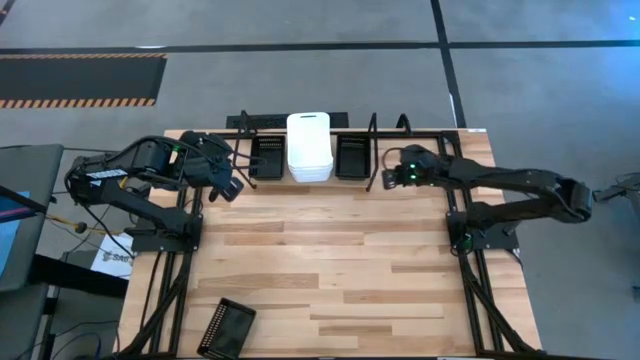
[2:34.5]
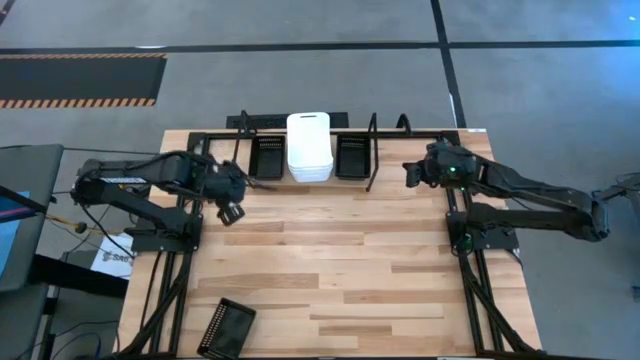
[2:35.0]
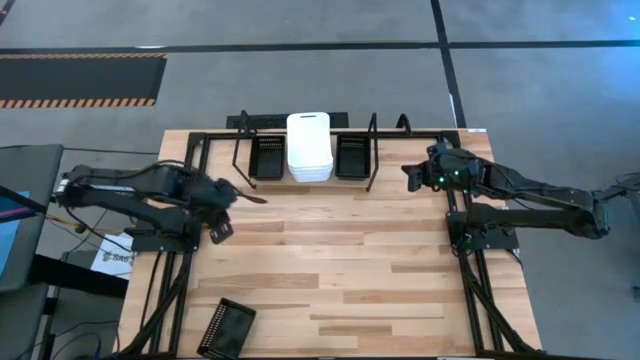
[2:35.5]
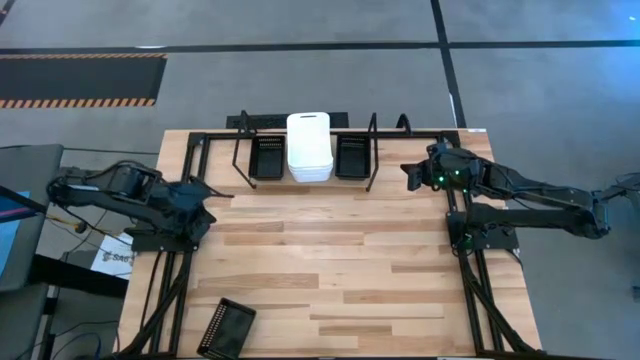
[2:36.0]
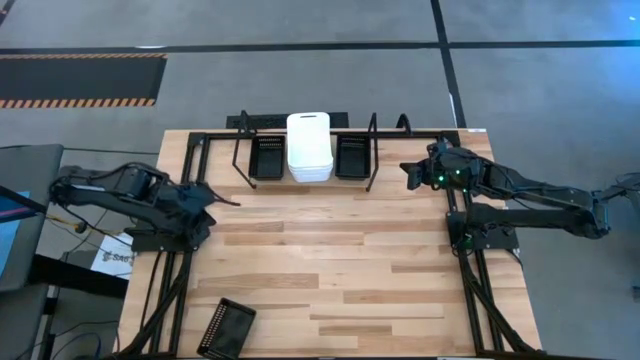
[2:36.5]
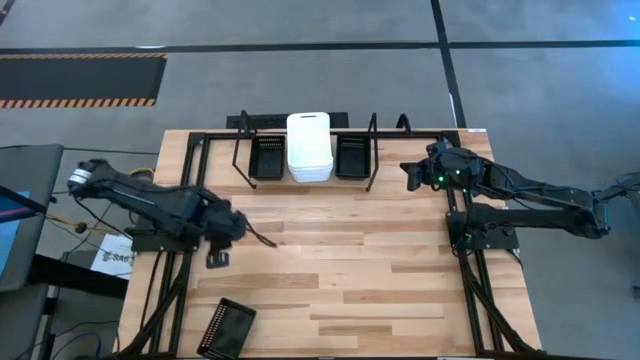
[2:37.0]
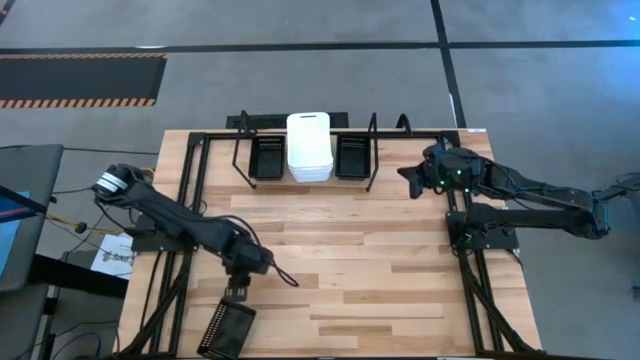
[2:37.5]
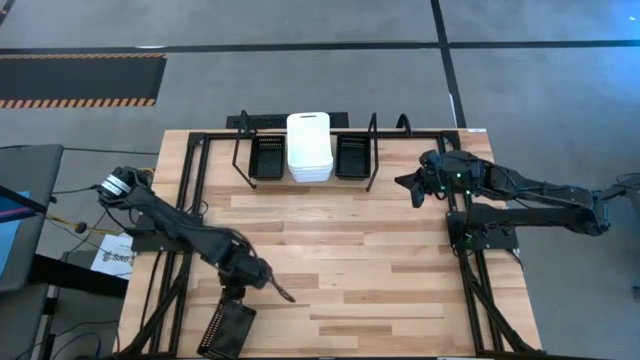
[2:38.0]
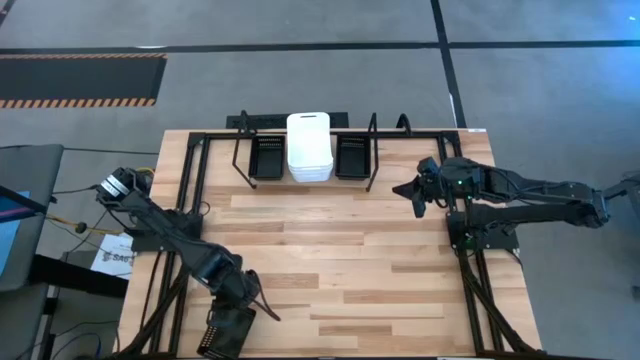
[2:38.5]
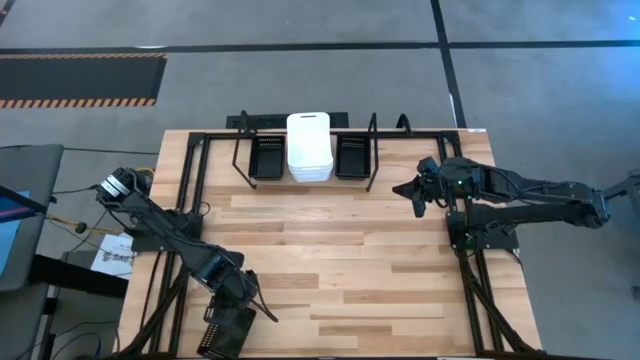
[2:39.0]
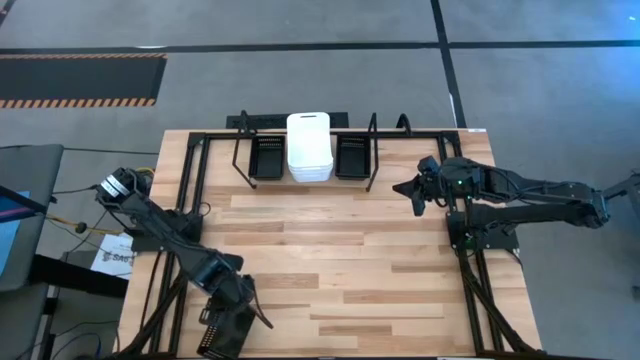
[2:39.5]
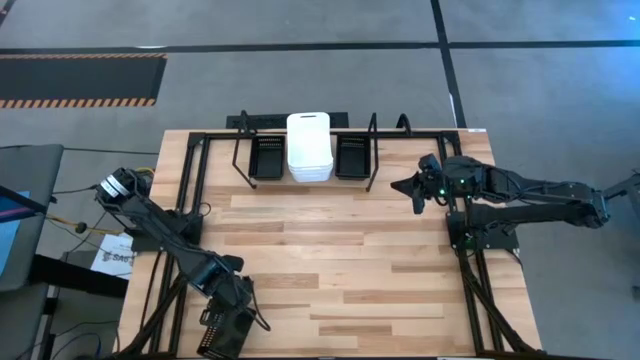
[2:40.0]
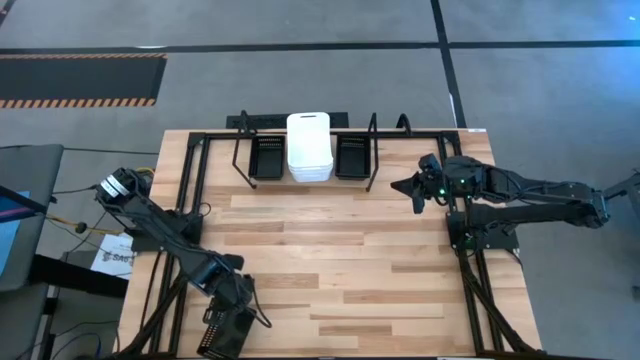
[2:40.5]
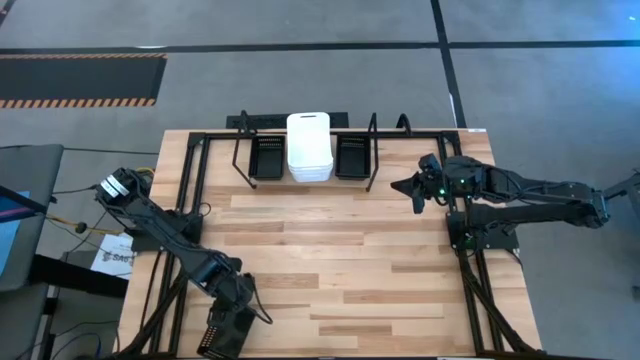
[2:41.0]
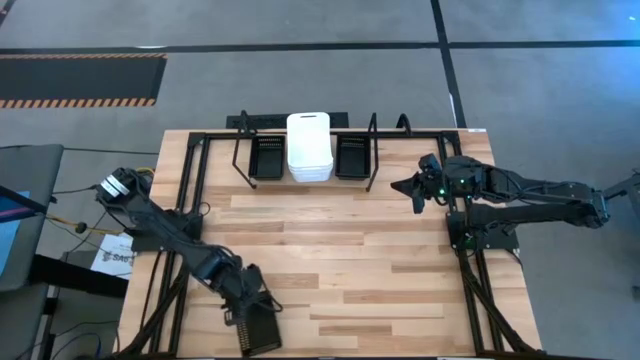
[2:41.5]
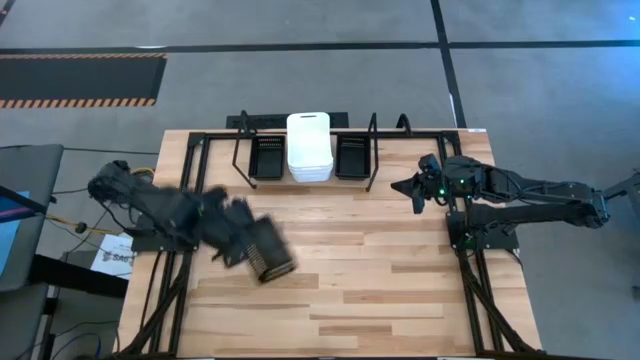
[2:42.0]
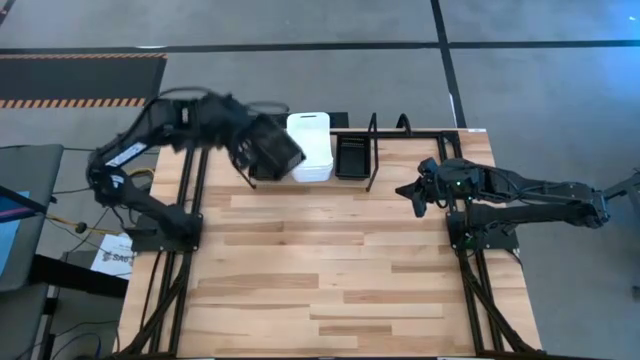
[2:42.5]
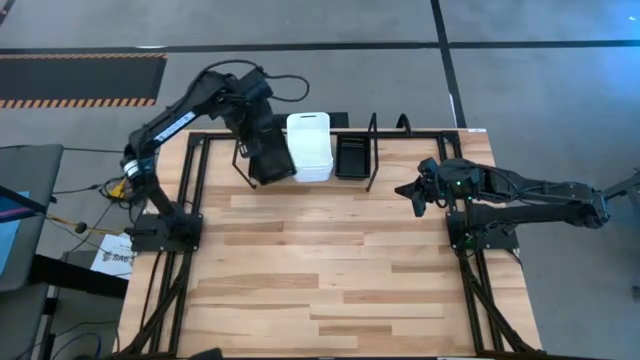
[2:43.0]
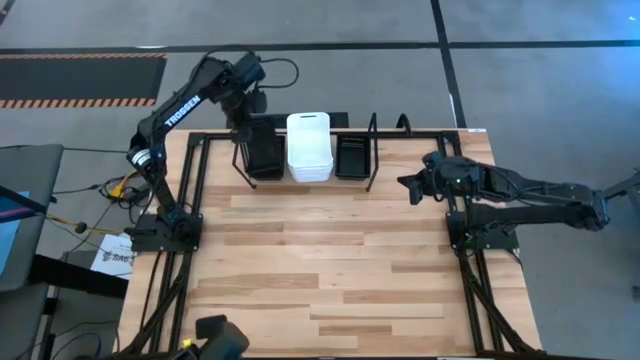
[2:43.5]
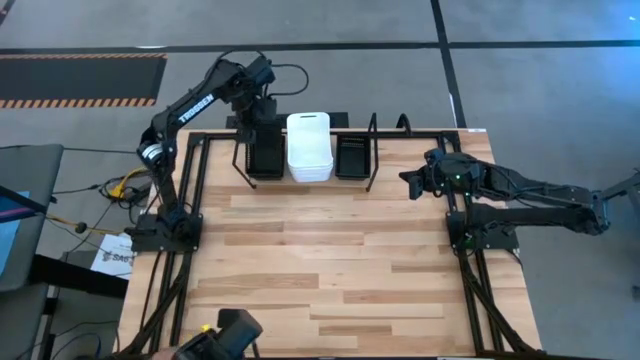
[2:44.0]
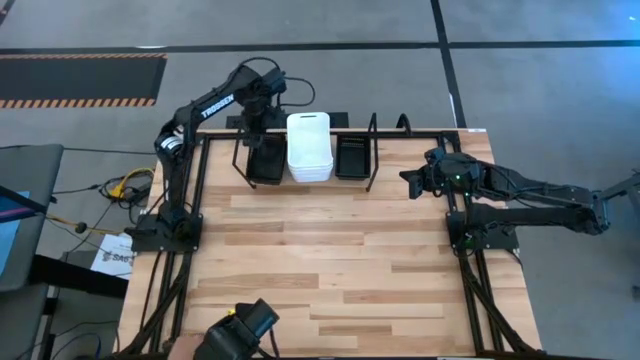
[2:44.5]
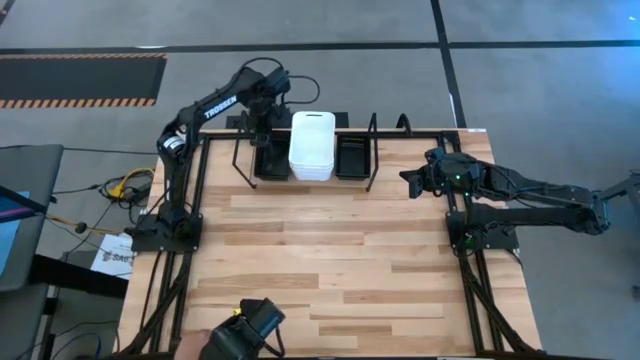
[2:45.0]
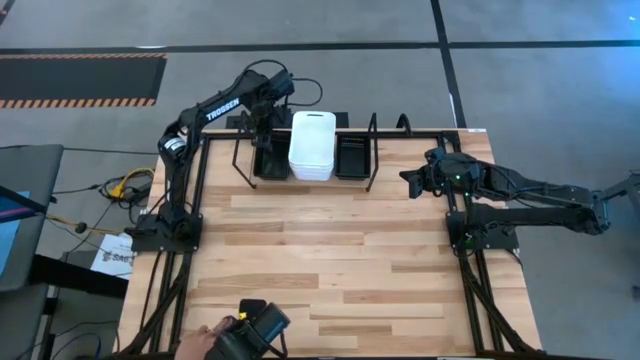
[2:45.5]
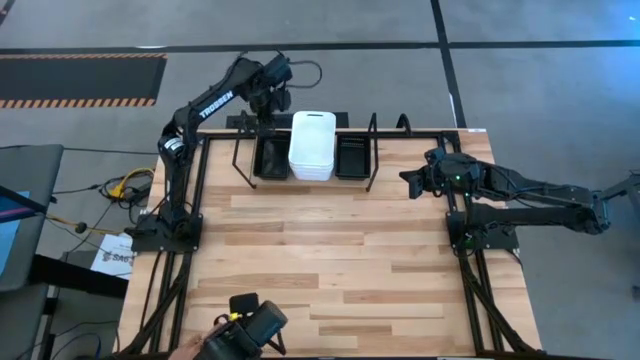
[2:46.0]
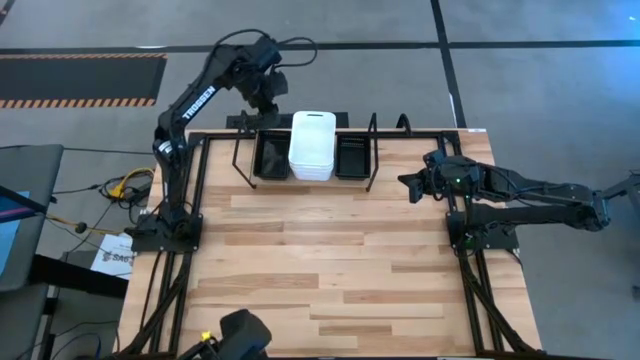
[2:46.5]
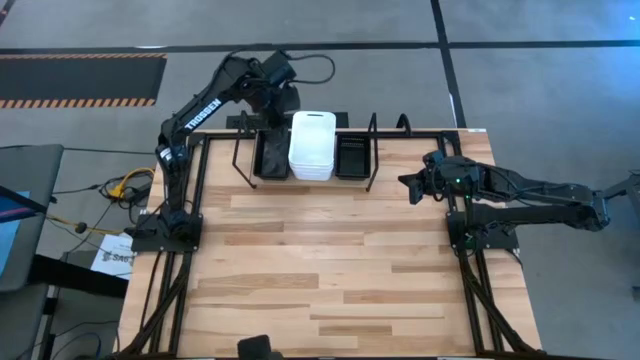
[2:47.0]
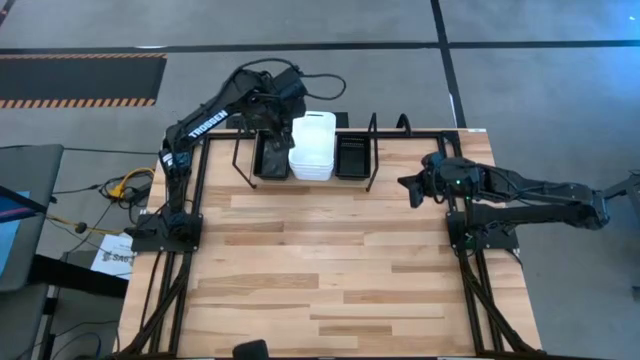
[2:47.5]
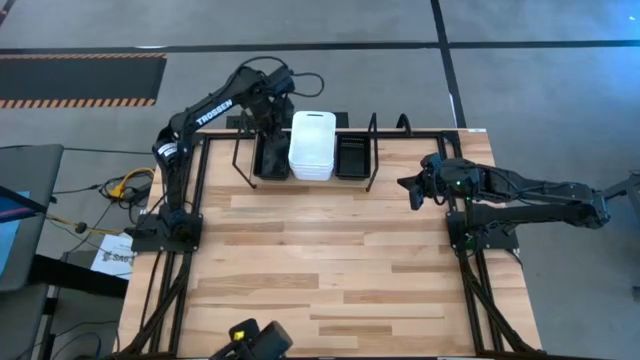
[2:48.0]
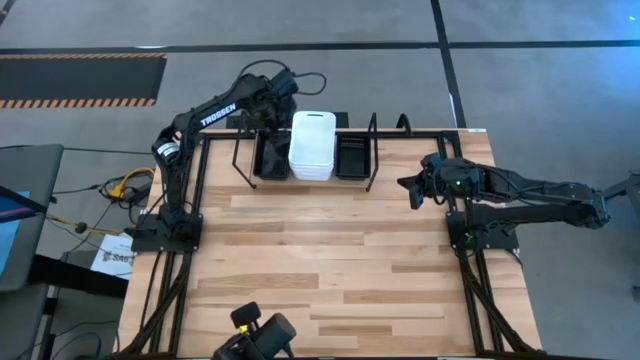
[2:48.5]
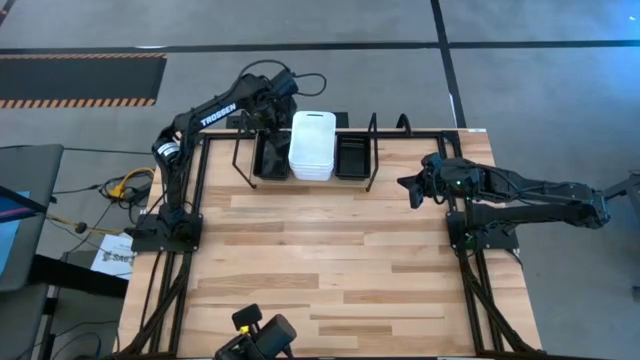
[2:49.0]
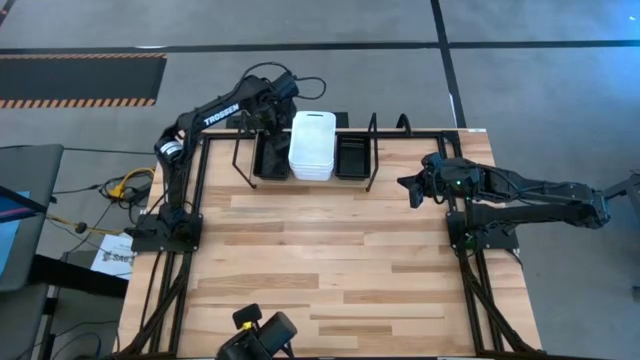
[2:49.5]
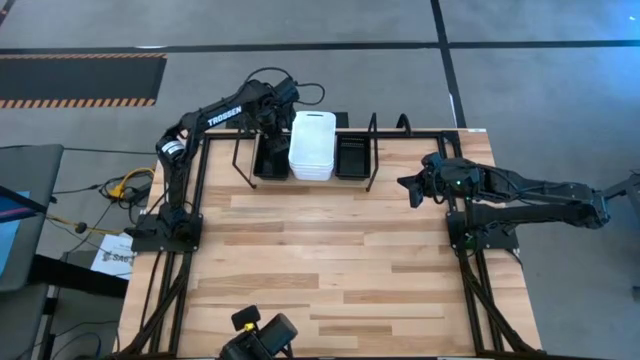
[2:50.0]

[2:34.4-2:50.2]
Task: Stack baskets on shelf by color
Stack the black bin on top of the left black bin on the shelf

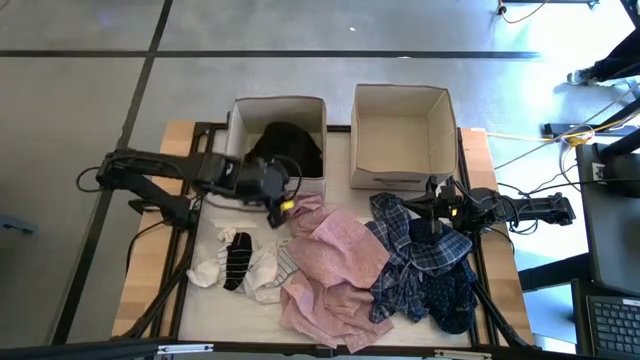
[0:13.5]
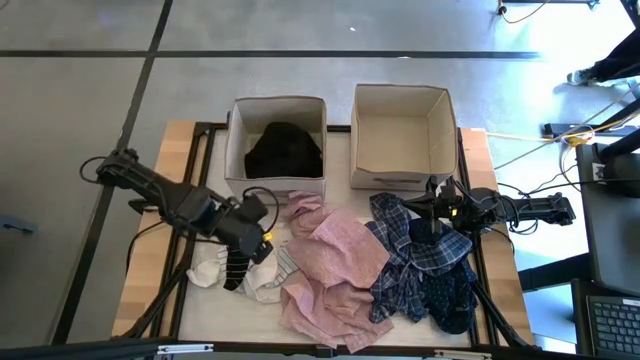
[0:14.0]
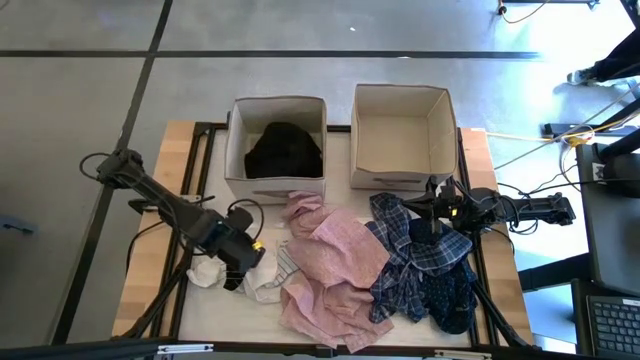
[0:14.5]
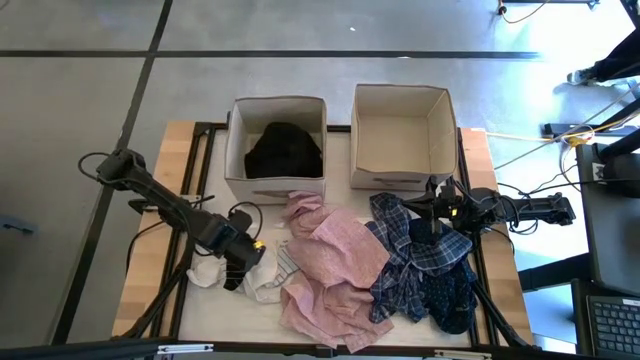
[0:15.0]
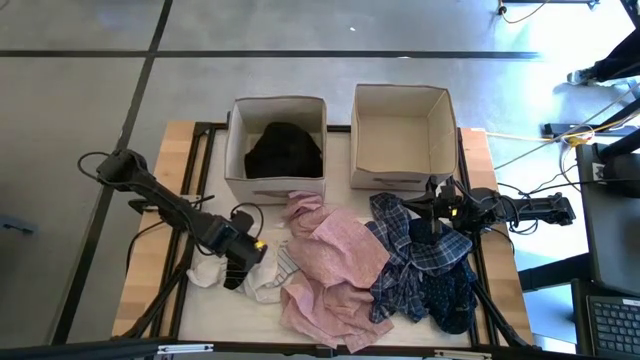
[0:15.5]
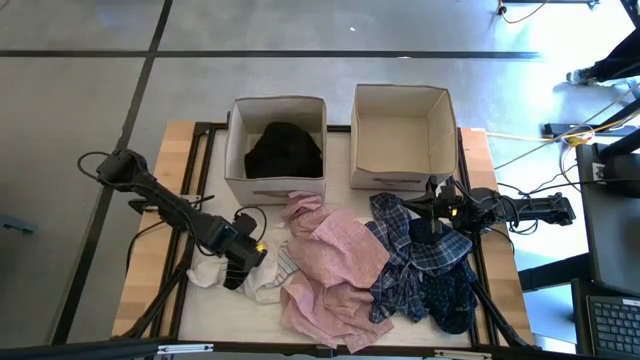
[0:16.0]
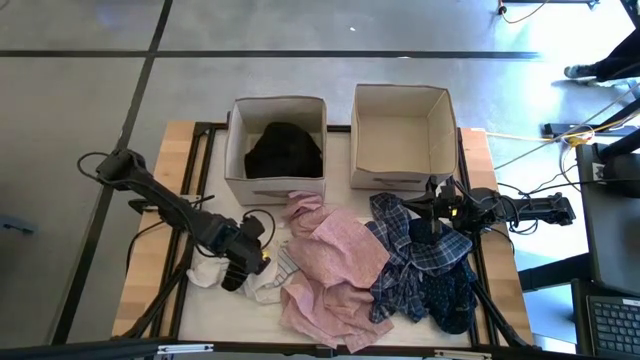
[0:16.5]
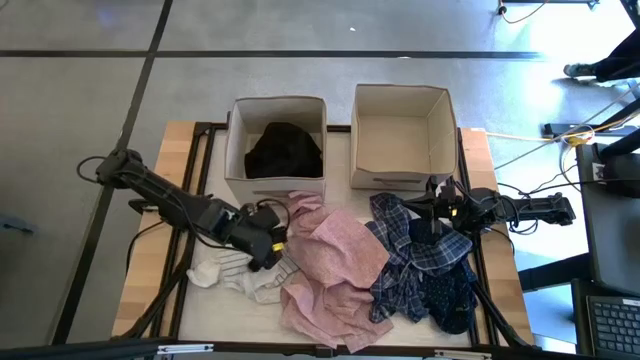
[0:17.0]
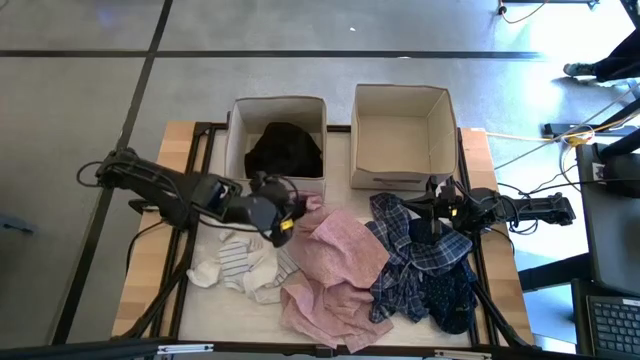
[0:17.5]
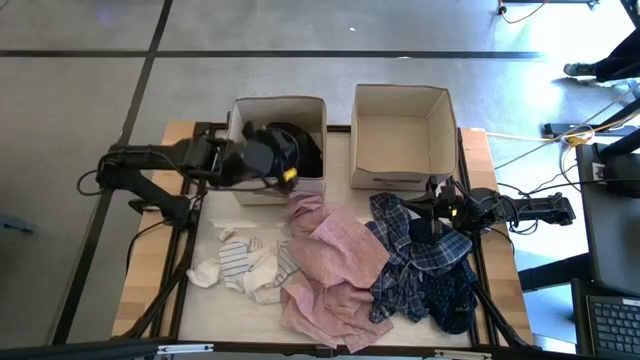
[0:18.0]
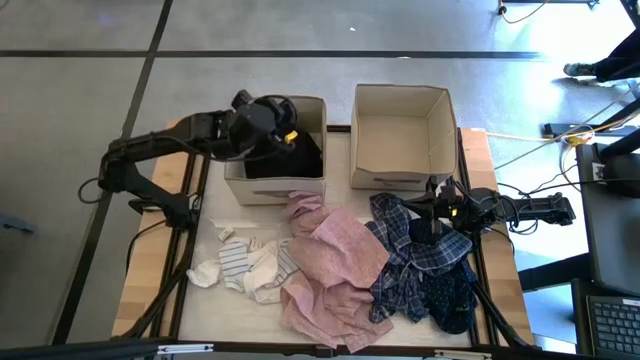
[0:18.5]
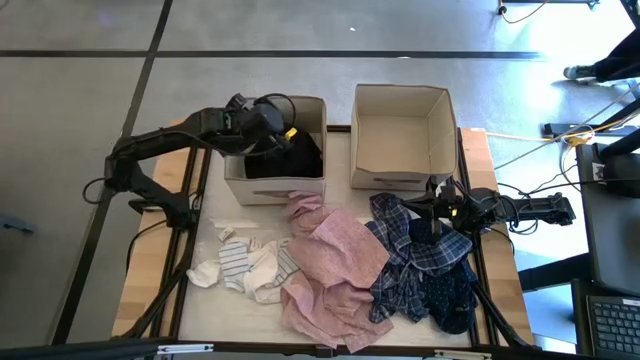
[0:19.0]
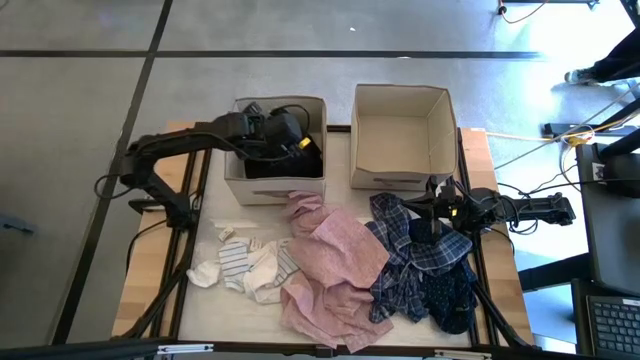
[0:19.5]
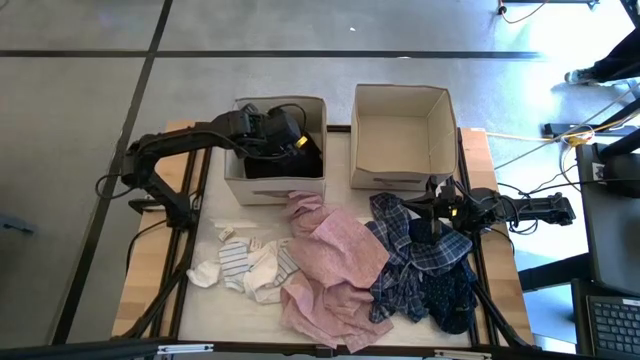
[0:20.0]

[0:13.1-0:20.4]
Task: Sort clothes
Put the black striped sock into the left laundry organizer
